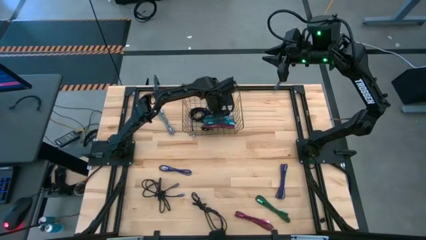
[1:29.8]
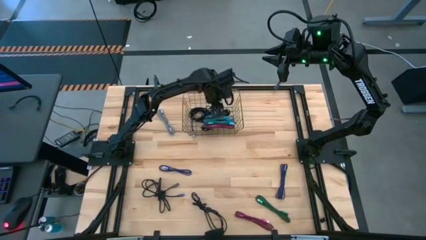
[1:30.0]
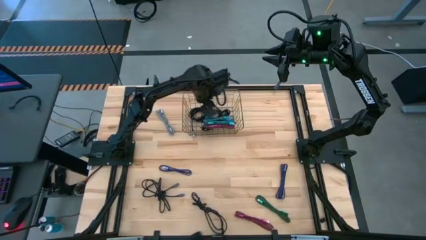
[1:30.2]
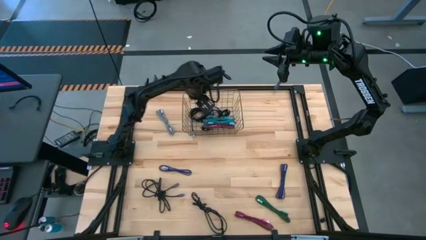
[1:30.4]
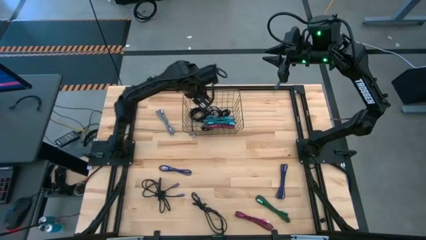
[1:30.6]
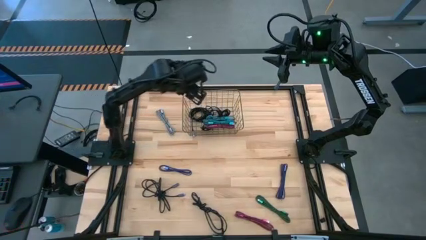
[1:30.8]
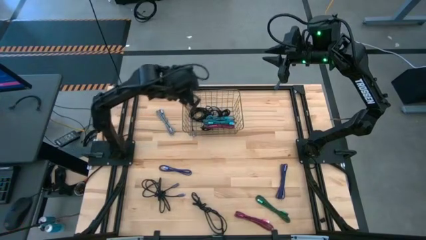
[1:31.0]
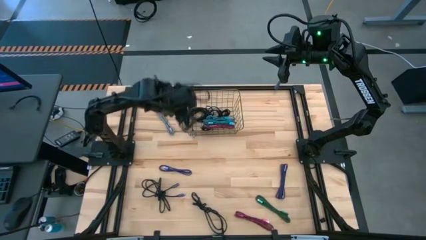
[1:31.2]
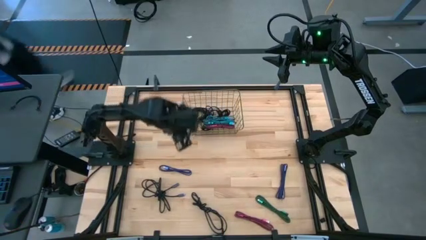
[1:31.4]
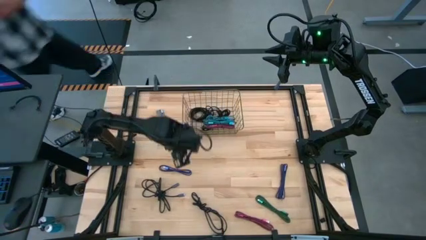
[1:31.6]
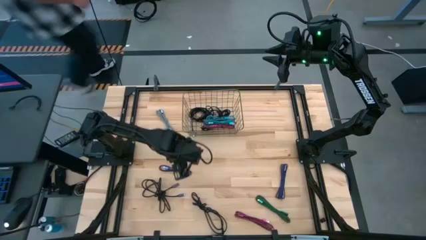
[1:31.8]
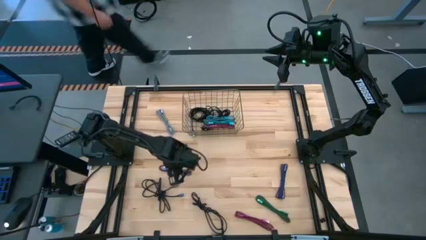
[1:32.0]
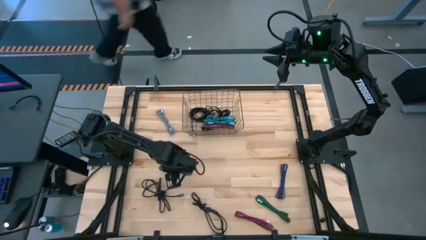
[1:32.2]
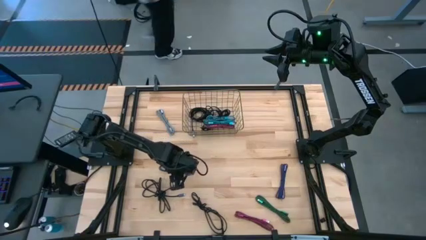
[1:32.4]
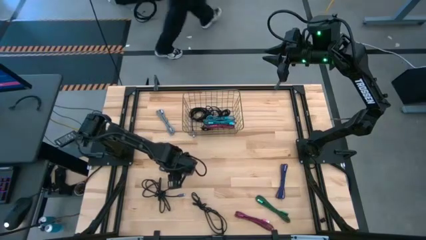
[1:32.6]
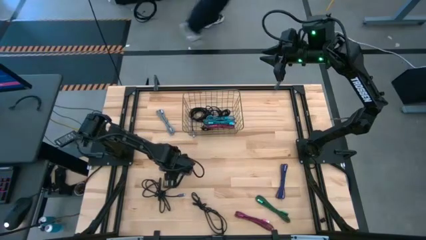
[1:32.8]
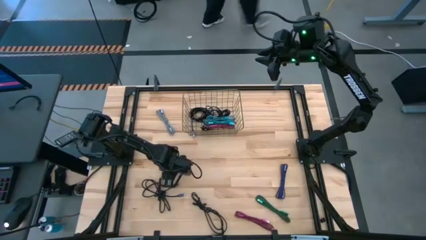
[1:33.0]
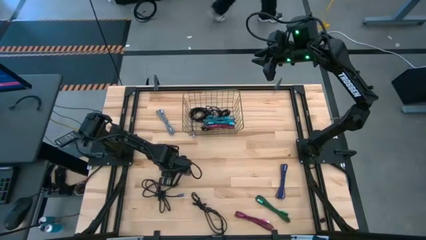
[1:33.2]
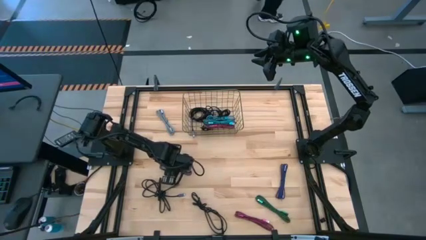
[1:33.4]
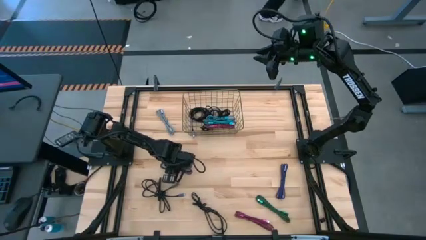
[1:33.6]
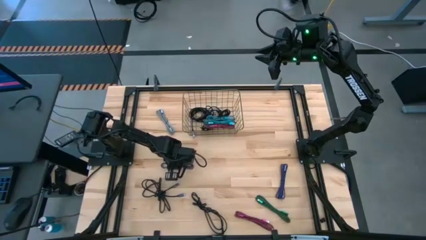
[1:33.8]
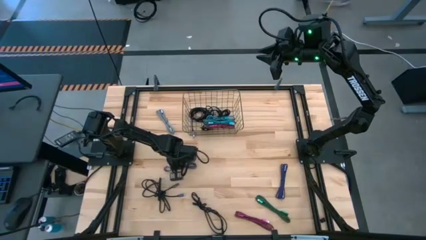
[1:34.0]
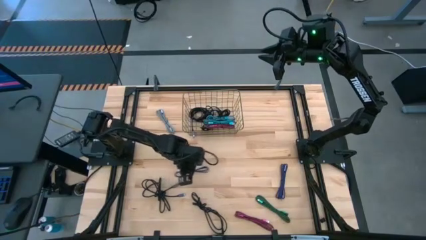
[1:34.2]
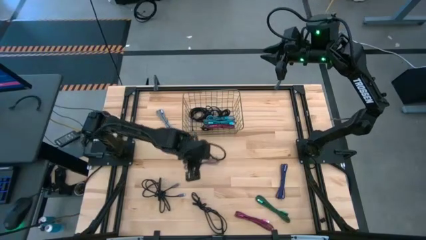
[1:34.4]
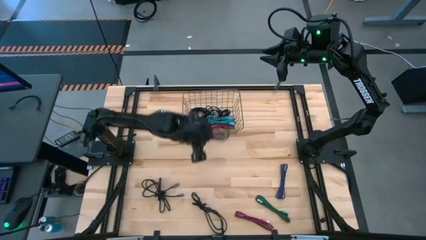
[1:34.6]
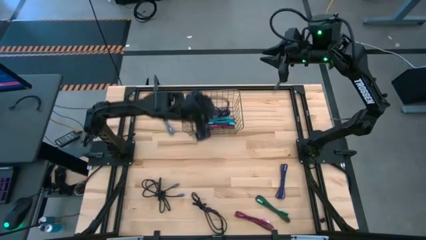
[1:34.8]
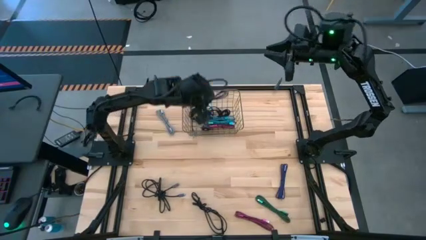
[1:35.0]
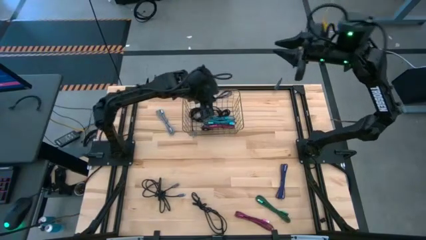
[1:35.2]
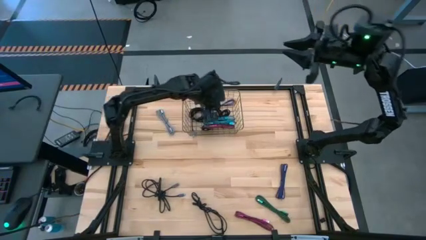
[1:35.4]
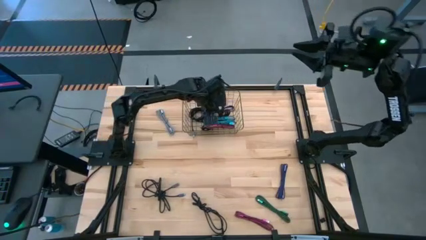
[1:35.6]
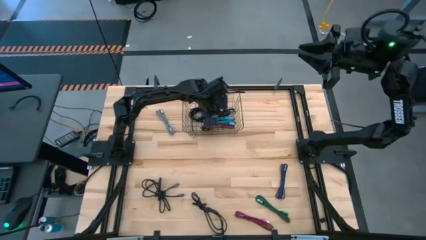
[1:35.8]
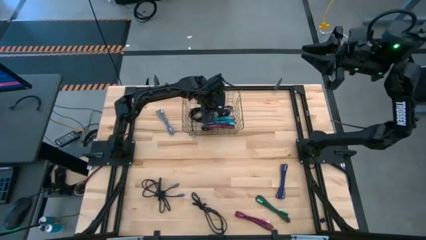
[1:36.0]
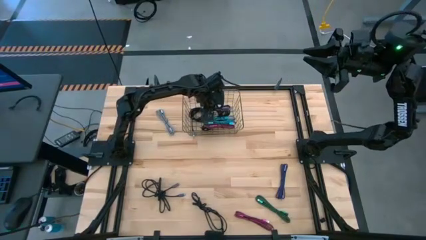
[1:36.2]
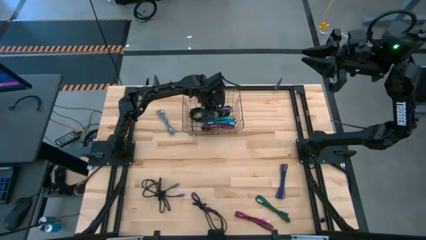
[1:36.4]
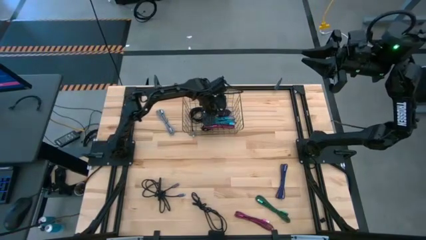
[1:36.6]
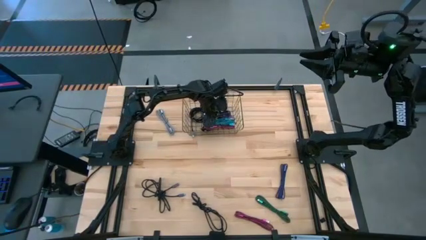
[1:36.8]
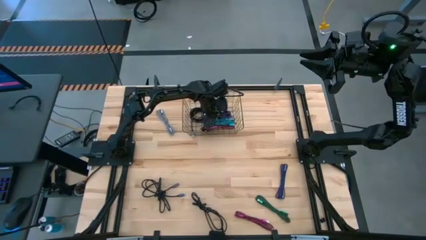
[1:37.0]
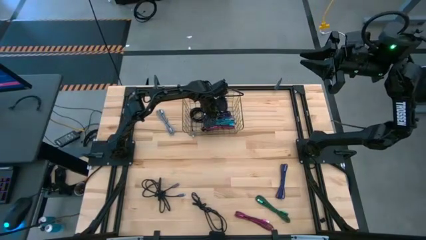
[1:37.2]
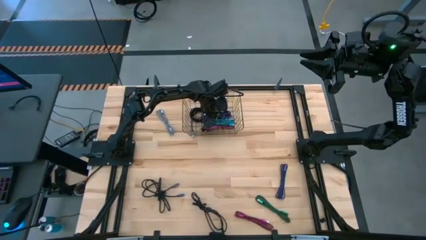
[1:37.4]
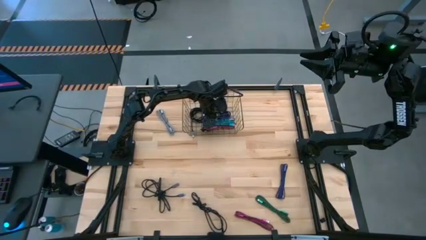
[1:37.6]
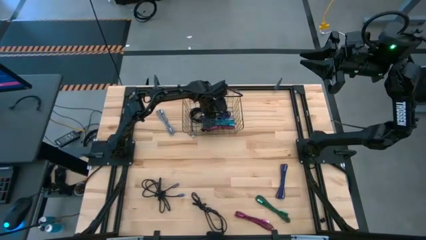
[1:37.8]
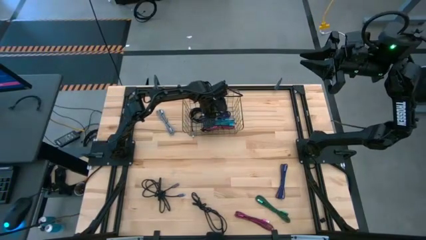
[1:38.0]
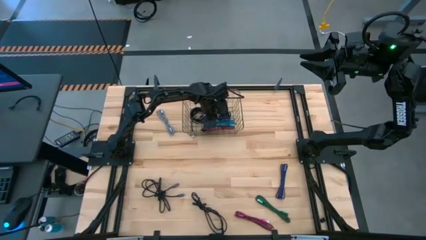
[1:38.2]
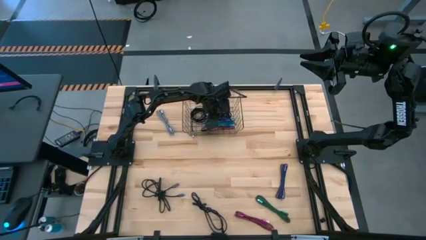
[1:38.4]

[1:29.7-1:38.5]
Task: Pick and place USB-C Cables
Put the violet charger cable into the wire basket

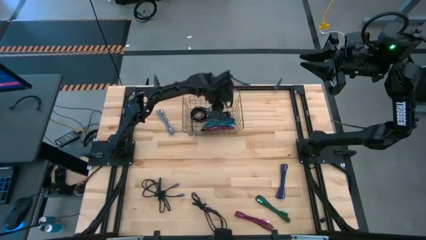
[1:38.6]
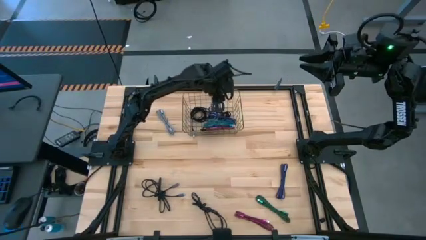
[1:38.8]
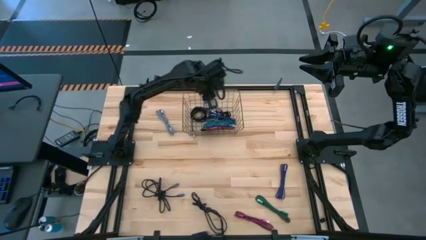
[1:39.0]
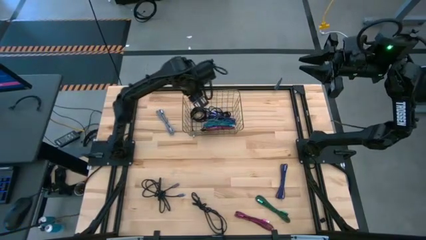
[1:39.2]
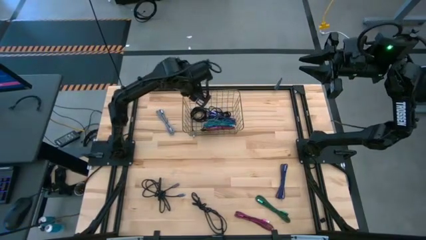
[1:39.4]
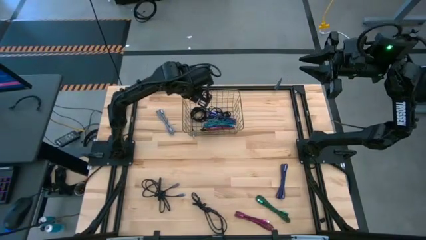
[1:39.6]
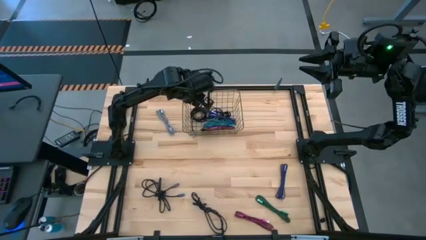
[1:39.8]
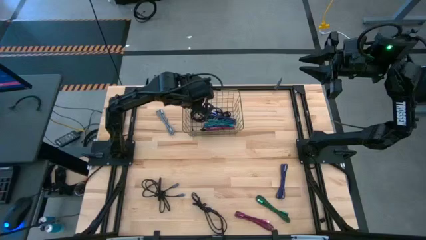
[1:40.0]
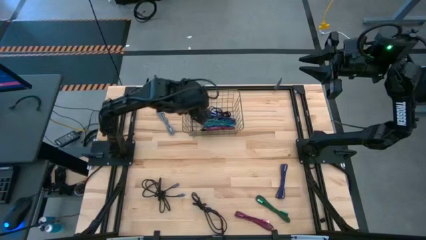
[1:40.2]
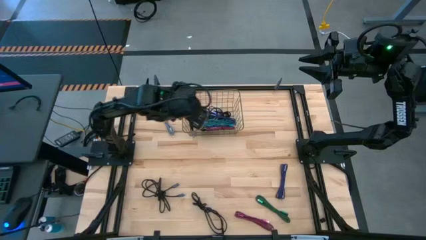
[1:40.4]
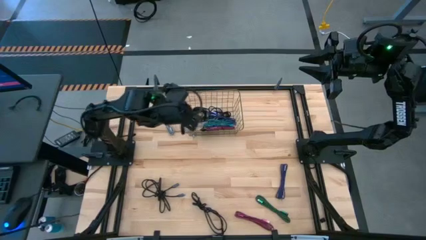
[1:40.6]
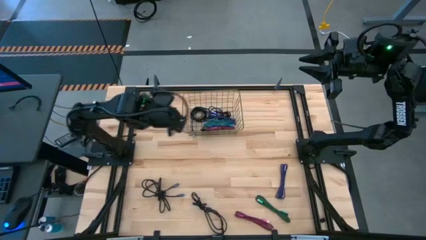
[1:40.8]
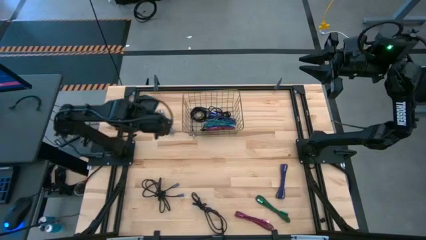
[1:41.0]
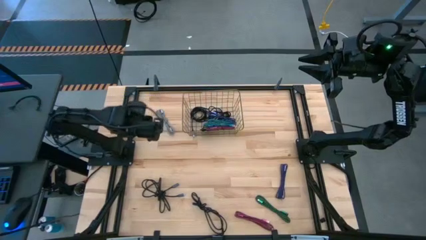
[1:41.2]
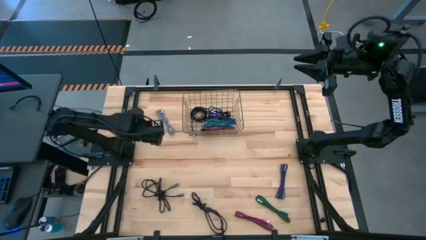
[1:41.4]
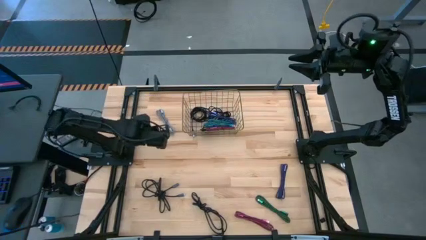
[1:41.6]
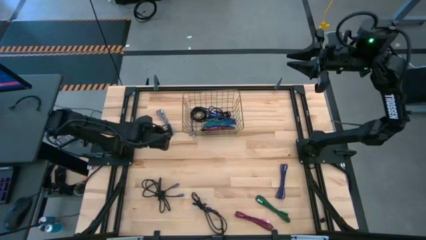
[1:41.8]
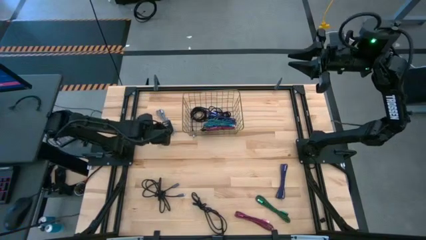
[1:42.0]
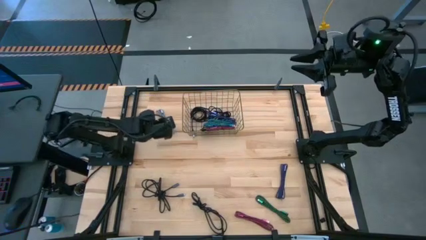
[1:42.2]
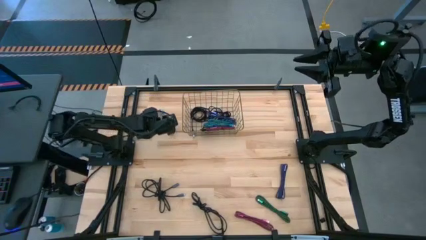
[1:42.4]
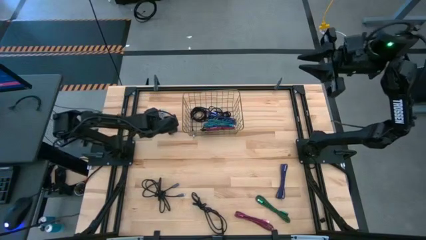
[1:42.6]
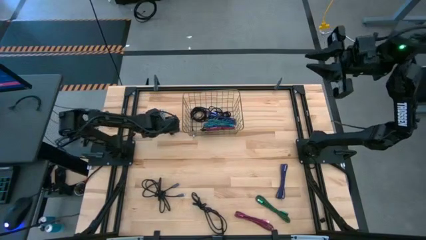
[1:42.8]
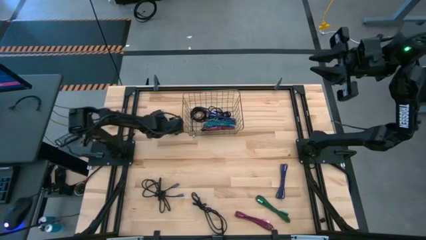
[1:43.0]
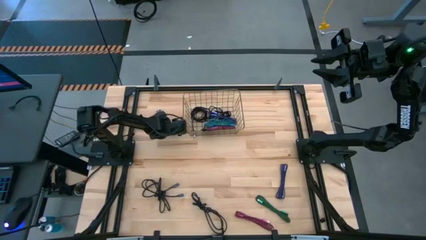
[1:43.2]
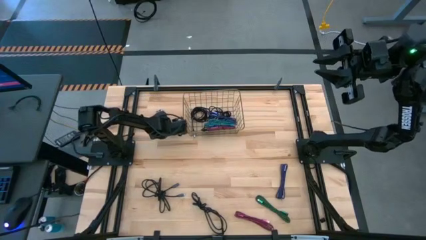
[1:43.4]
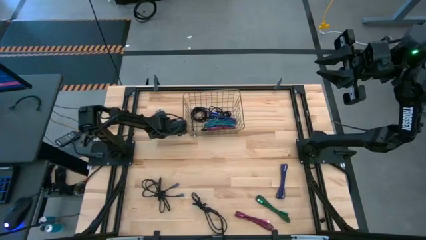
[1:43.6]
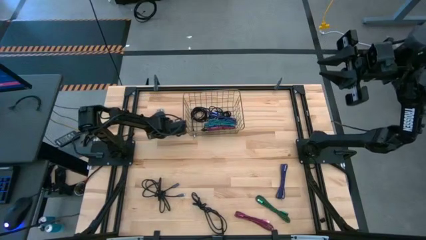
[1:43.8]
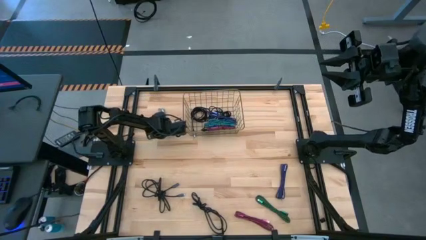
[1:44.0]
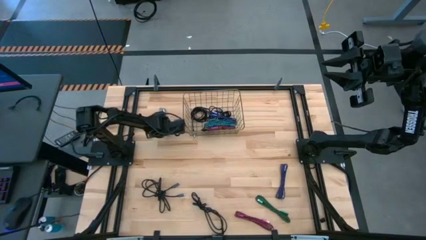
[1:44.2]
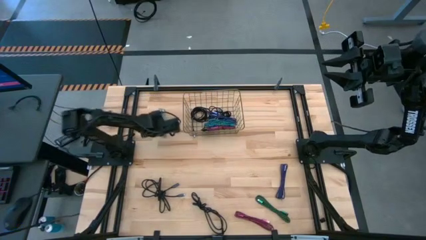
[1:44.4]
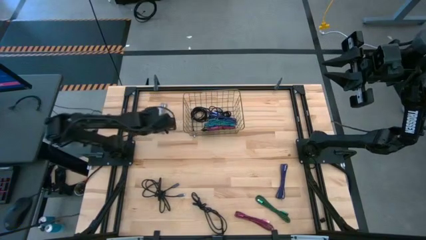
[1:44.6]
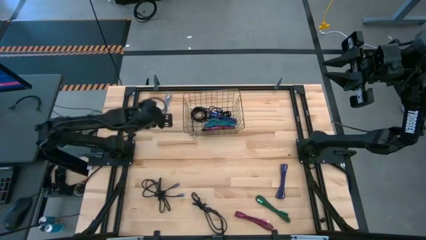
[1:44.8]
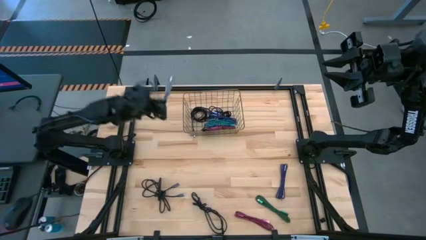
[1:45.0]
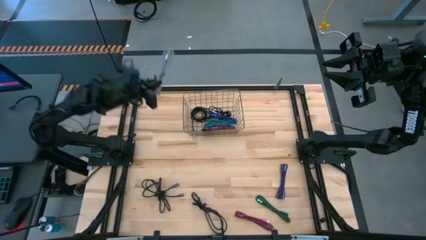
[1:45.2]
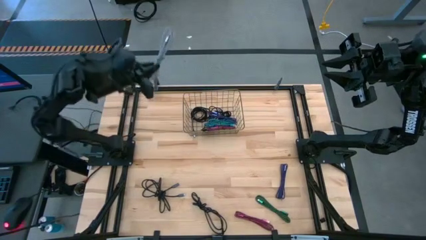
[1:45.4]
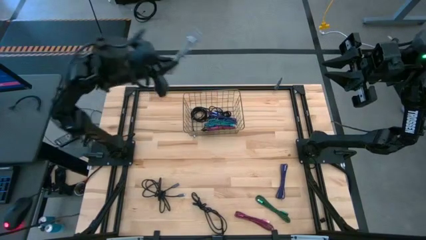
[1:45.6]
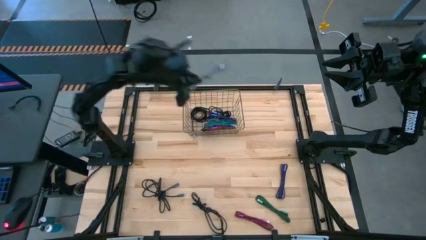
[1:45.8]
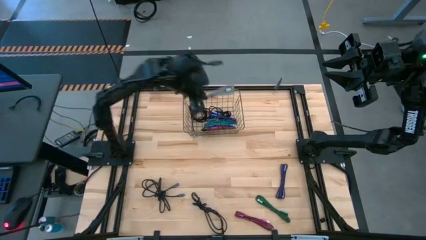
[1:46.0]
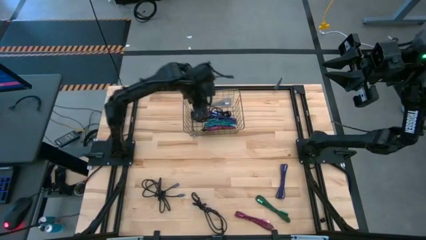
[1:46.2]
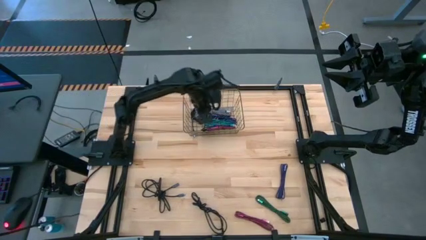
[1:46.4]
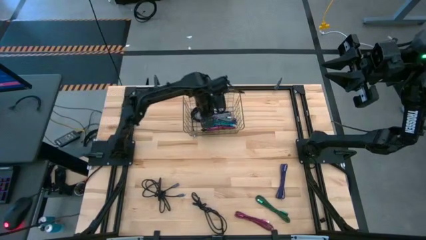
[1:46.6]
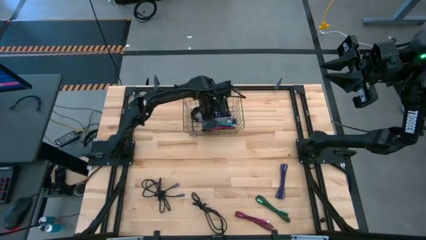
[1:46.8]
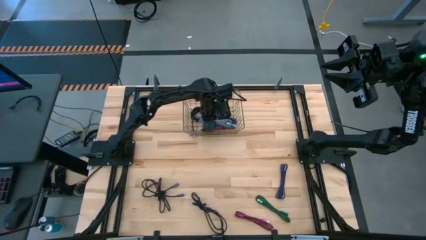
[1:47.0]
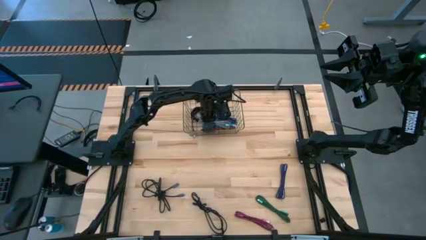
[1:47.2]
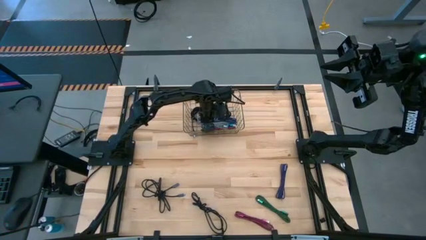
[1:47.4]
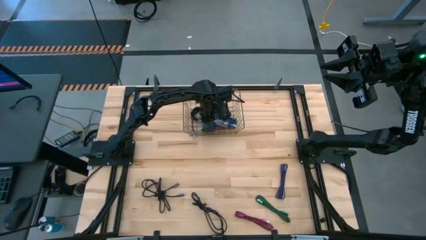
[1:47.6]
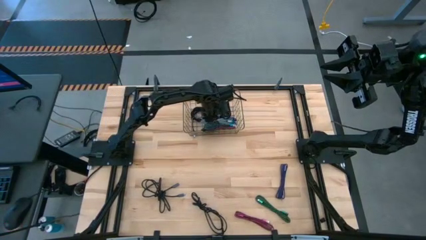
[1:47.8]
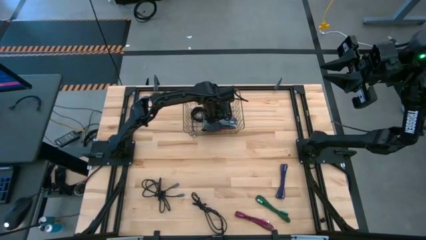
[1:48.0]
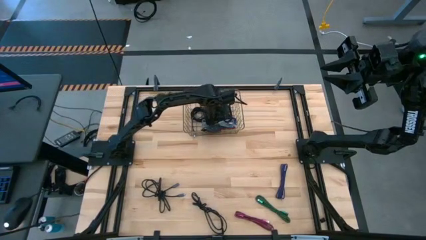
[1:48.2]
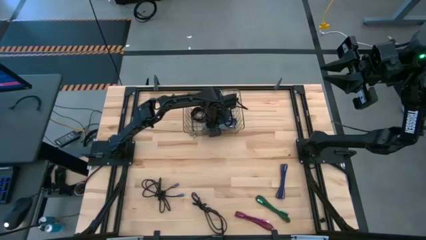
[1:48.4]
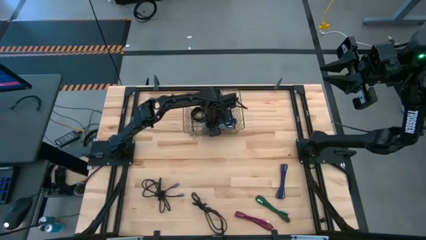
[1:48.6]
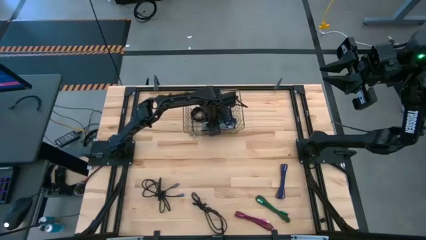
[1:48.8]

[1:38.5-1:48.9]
Put the white charger cable into the wire basket
